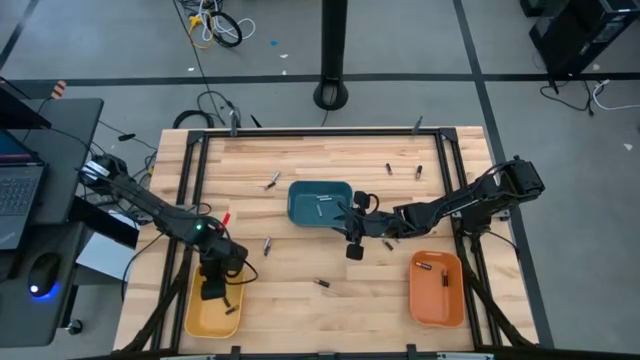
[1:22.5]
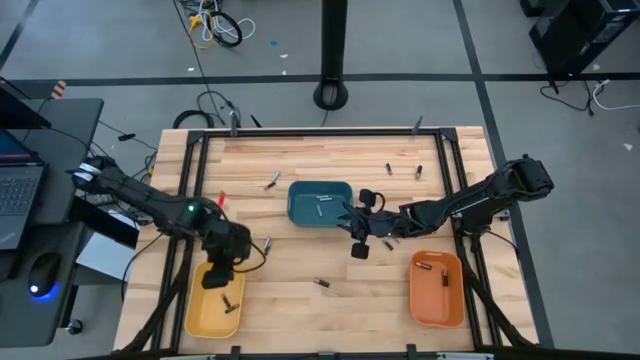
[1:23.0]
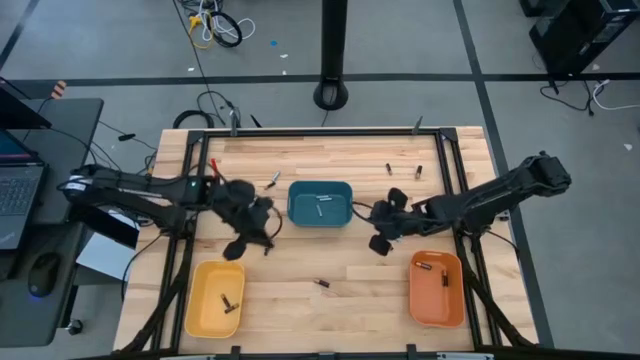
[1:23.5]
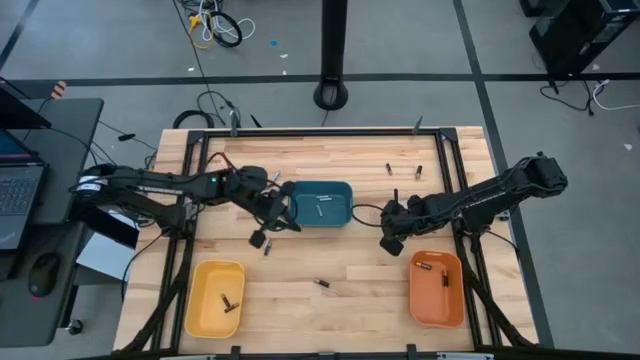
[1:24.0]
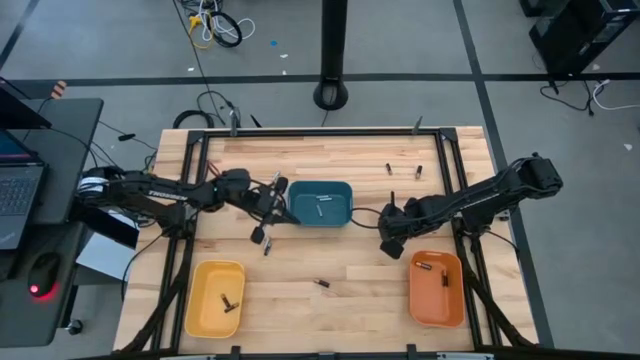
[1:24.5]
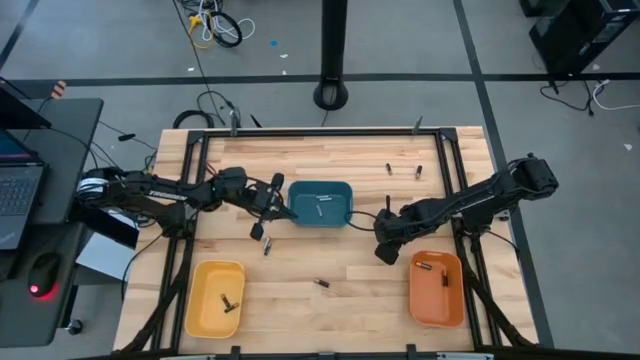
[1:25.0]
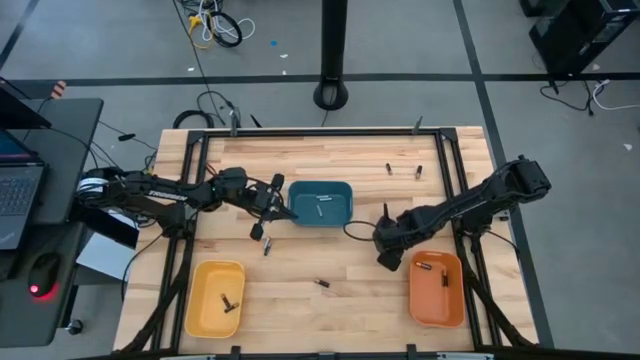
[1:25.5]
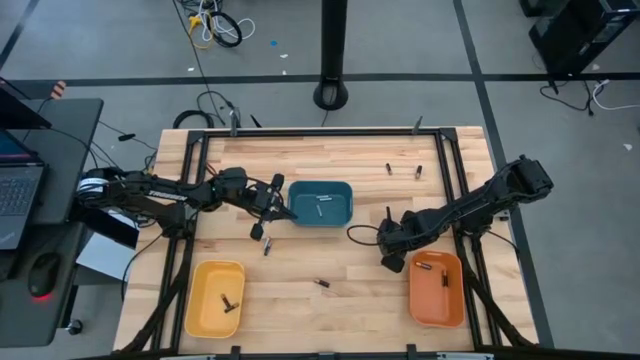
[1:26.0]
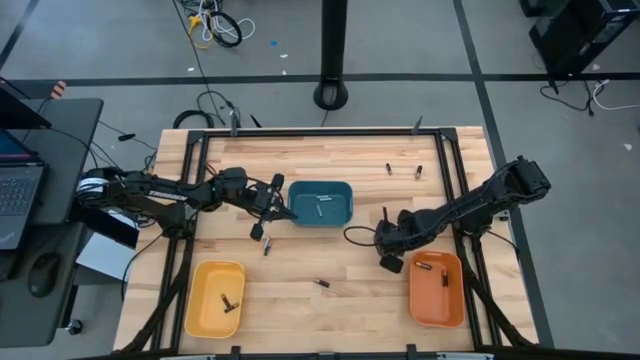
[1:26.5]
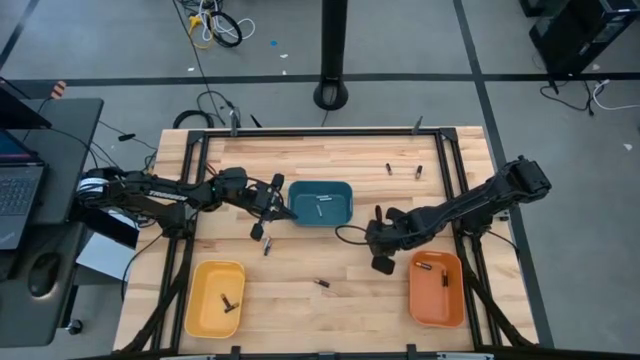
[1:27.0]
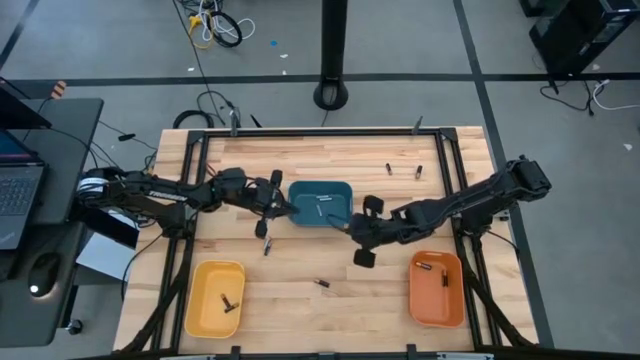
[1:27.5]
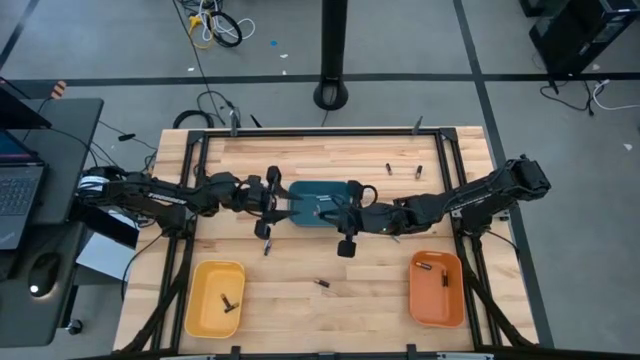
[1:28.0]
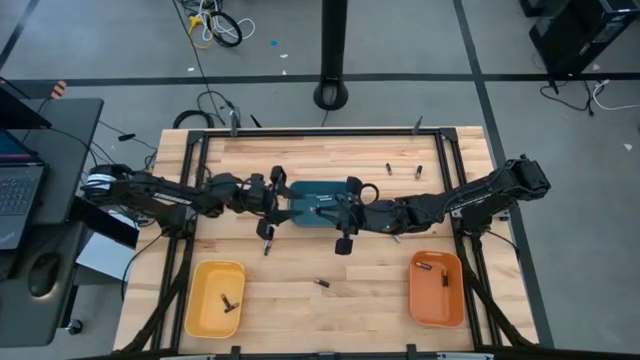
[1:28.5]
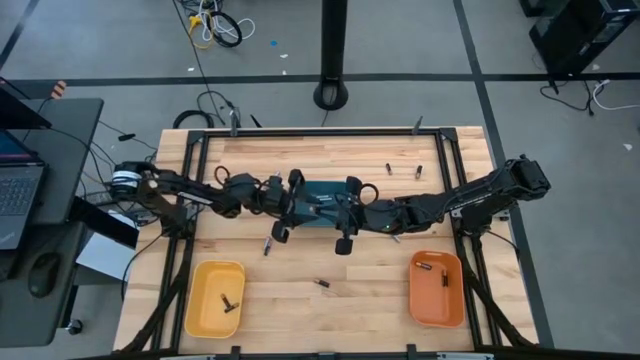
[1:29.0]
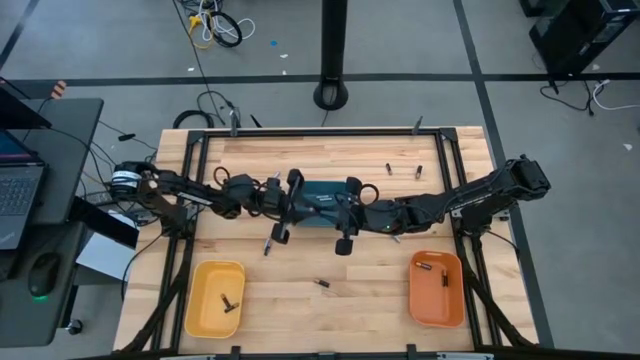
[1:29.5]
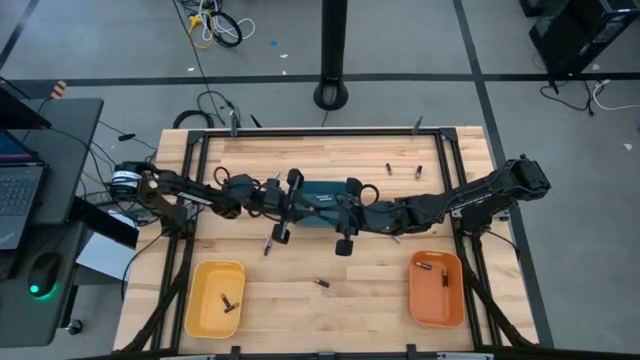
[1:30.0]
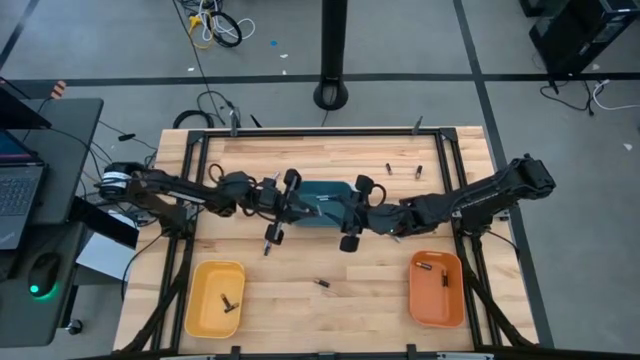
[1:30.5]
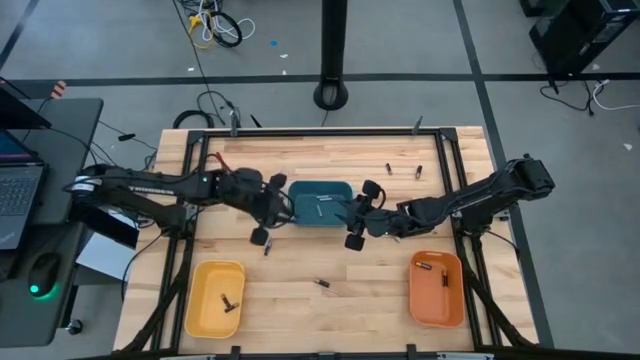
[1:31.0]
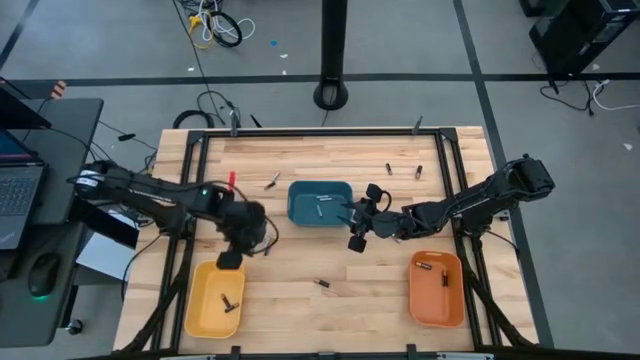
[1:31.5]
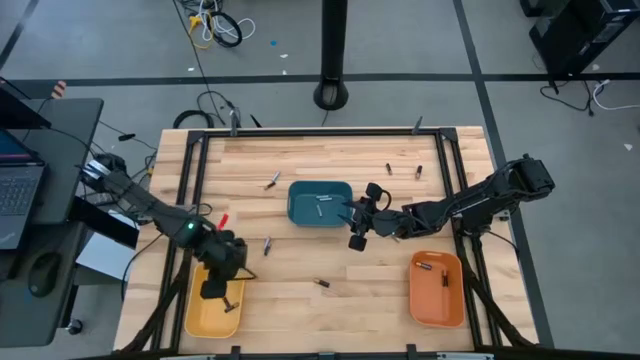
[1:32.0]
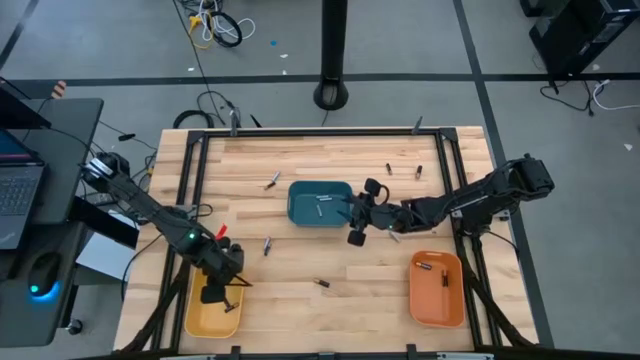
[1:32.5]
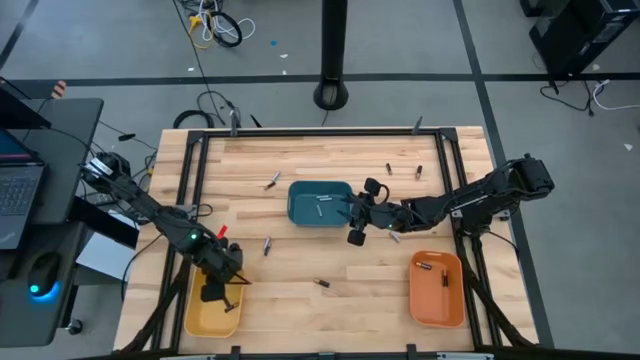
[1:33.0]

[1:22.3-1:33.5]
Task: Sort batteries
Put the black battery into the yellow bin

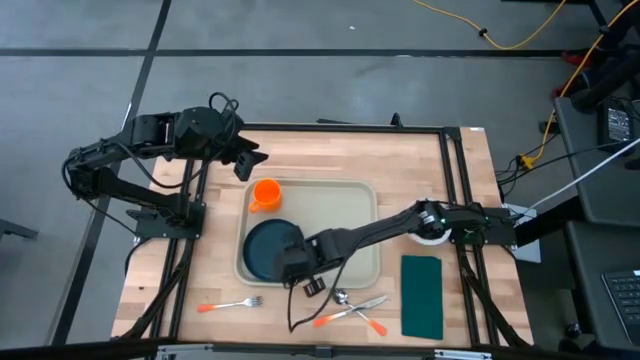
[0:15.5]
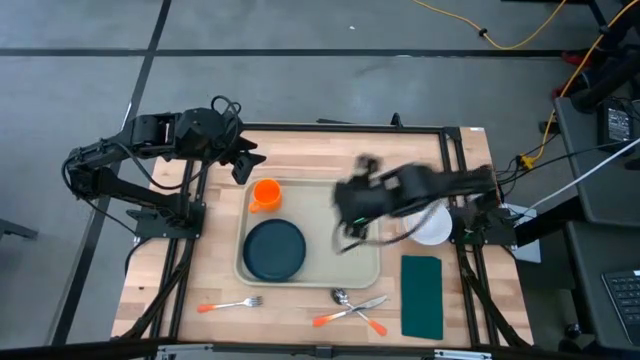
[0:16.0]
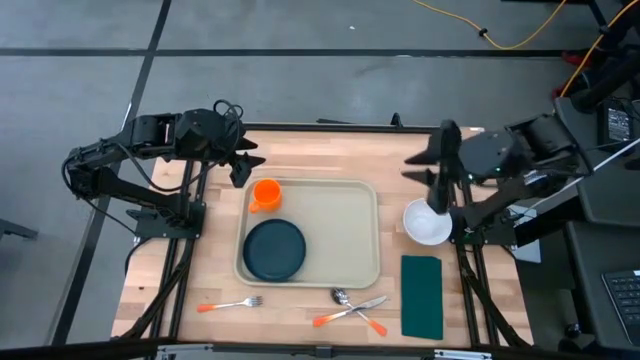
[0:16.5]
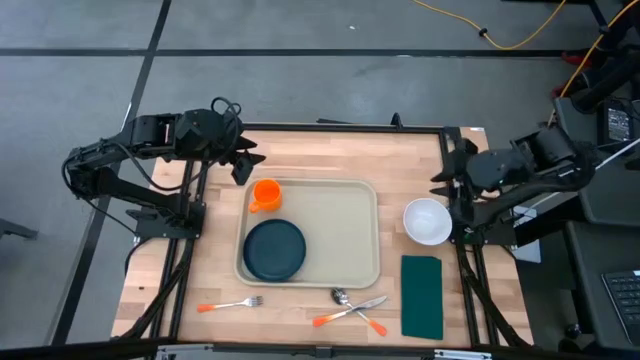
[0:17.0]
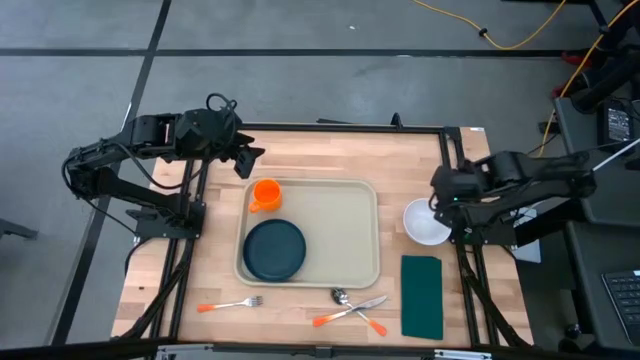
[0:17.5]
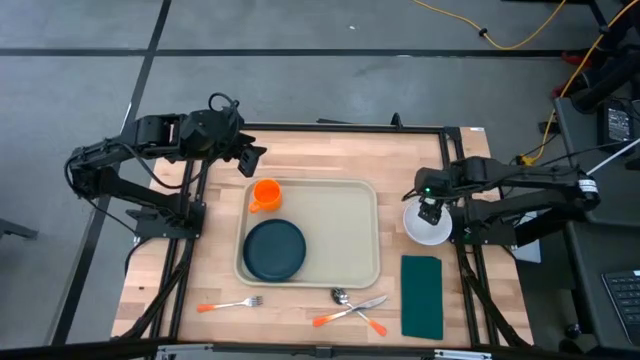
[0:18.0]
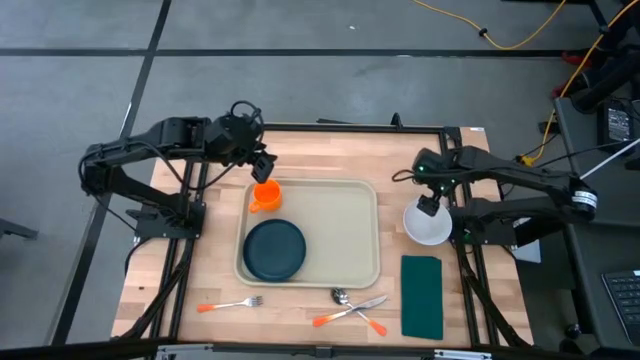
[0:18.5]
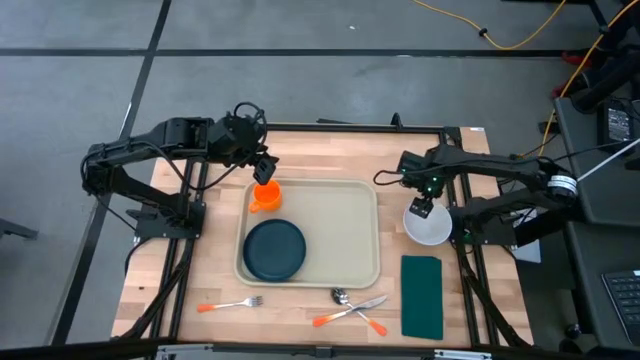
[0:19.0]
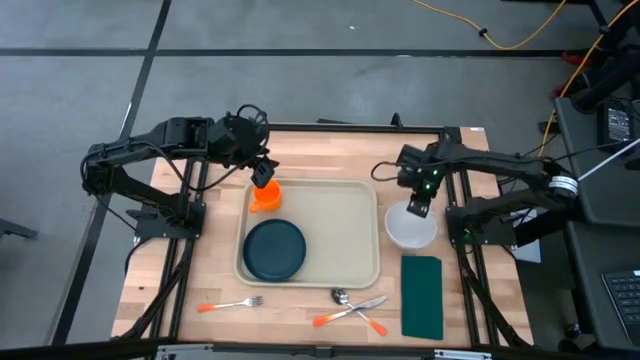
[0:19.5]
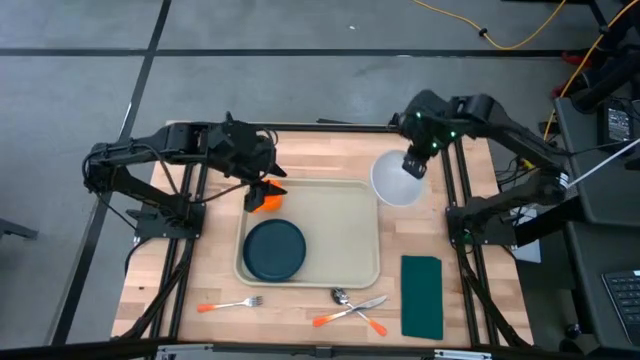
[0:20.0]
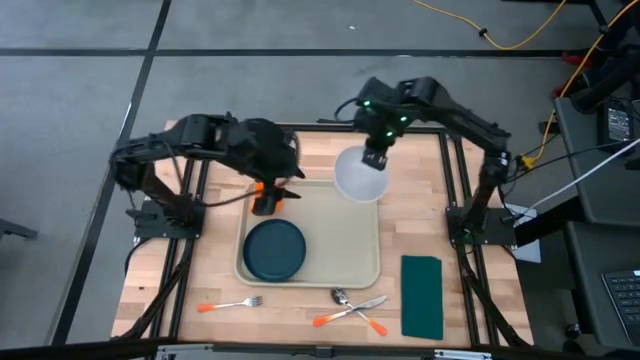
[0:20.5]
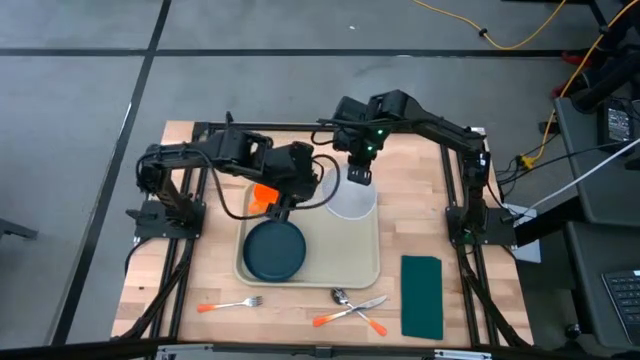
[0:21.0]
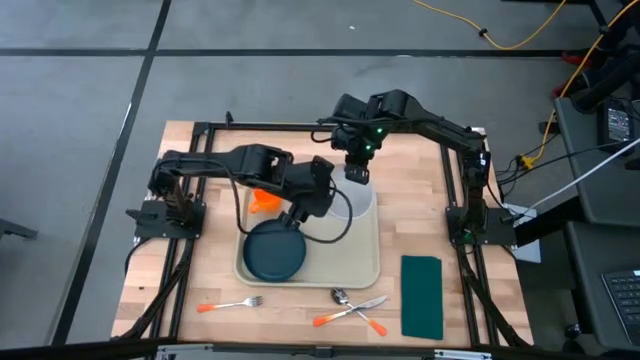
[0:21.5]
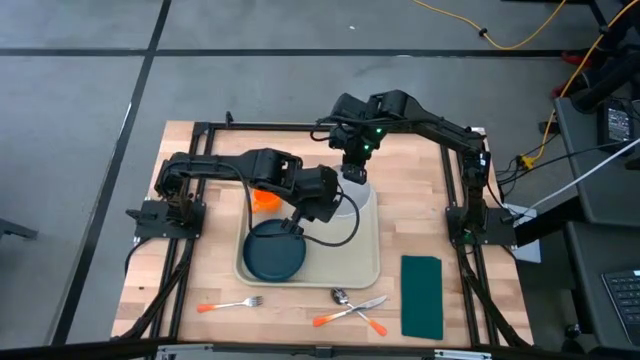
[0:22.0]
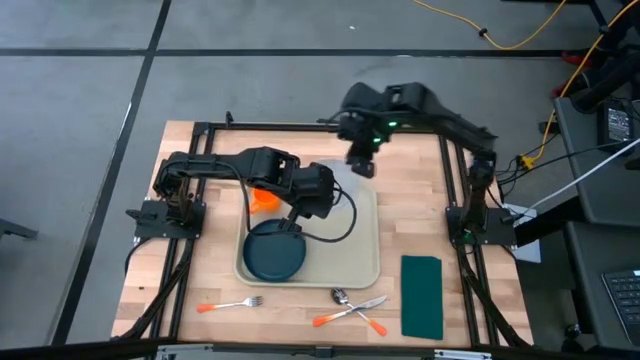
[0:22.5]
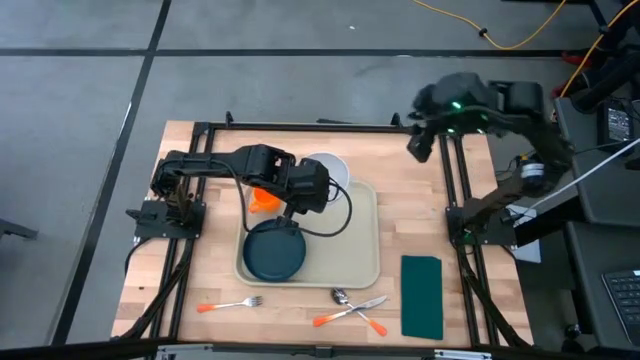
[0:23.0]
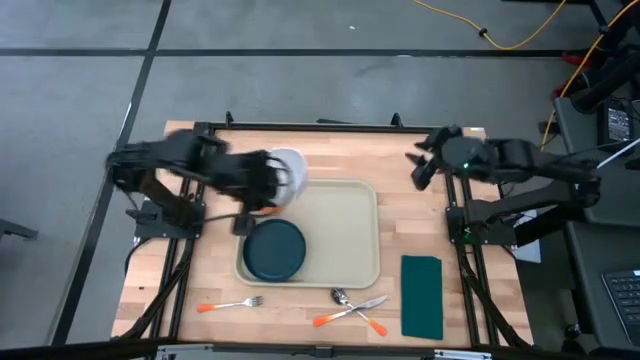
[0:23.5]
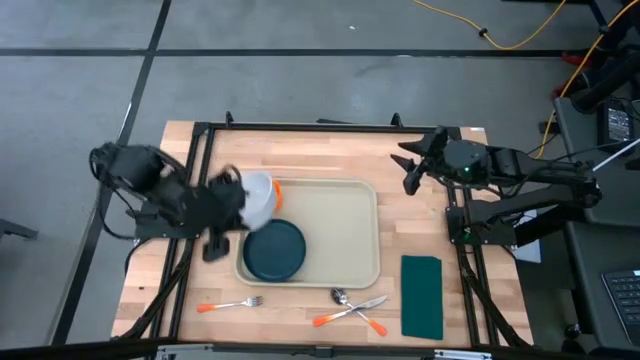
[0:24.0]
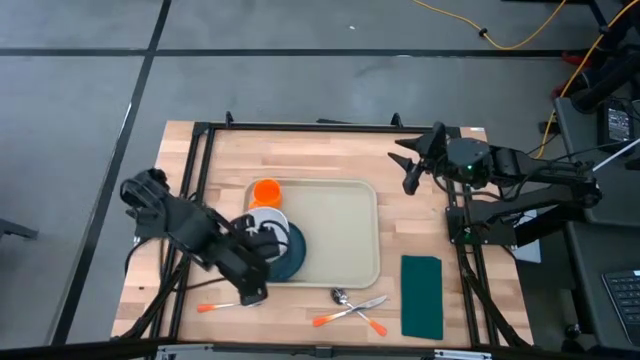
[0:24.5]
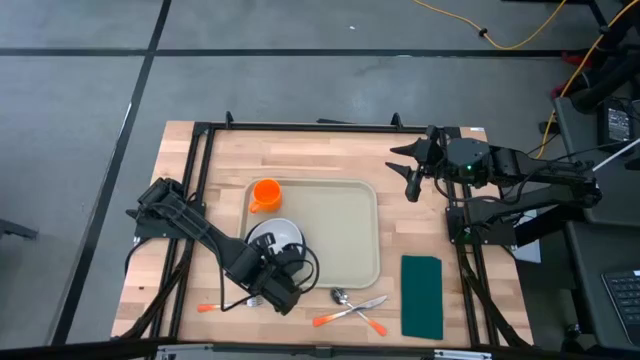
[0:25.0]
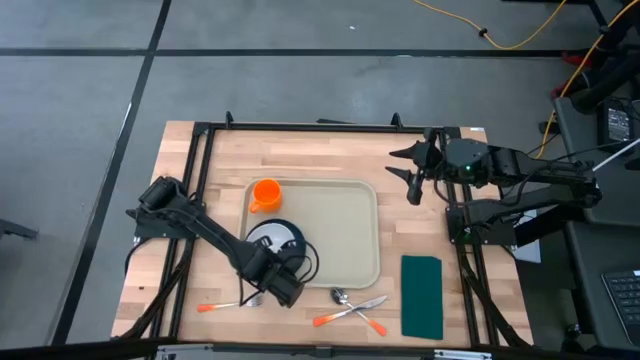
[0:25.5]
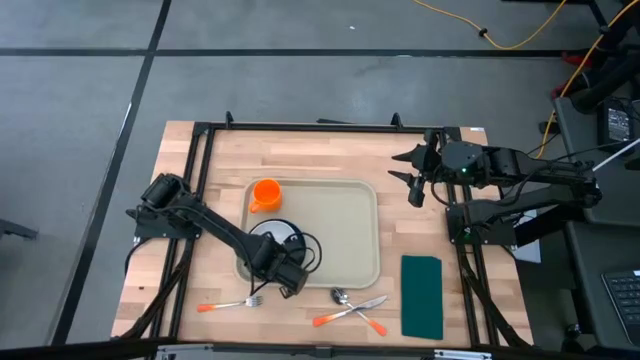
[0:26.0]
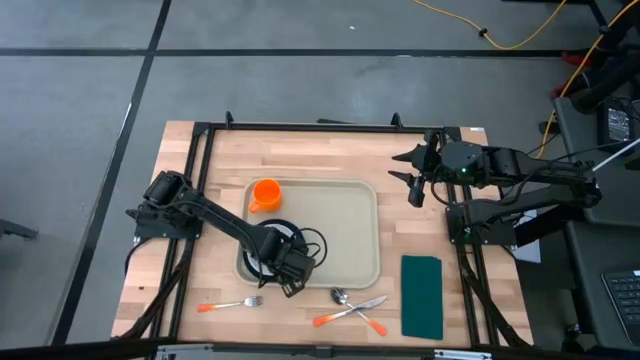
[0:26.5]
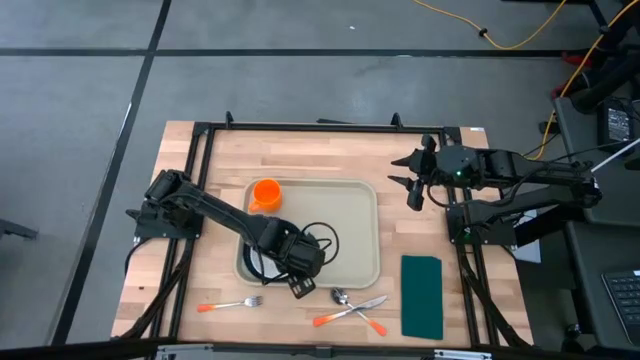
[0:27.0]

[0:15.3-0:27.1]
Task: Set up tray
Put the white bowl on the gray tray
